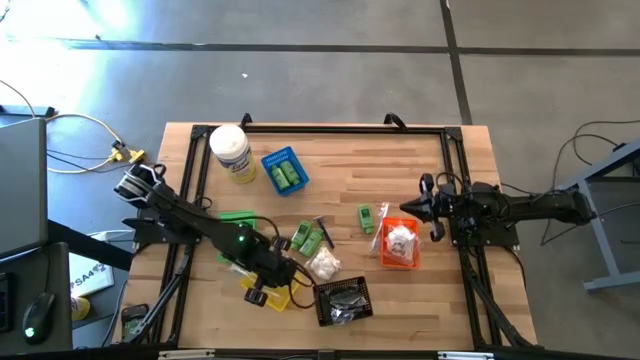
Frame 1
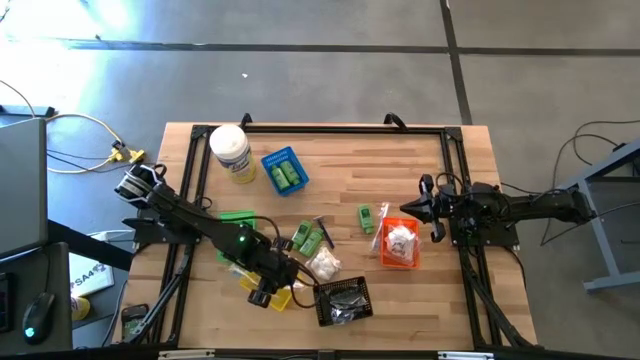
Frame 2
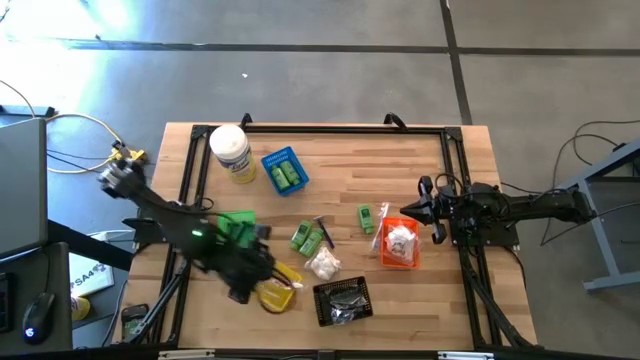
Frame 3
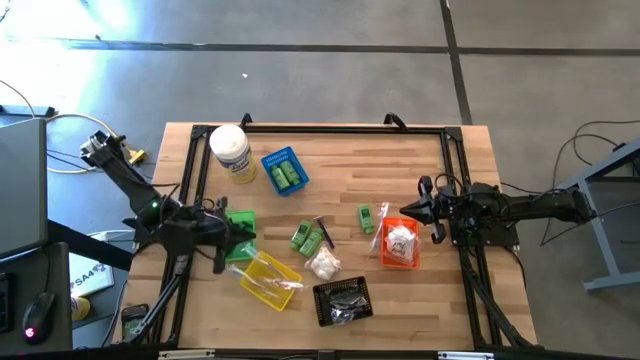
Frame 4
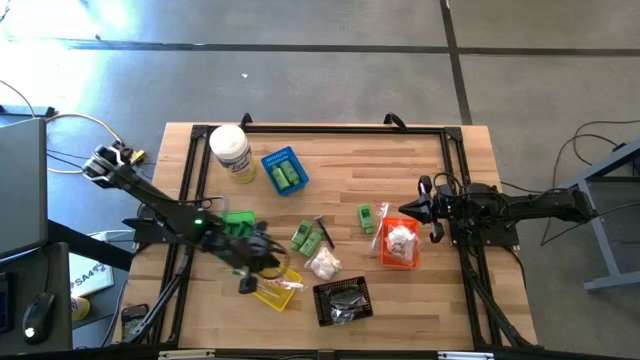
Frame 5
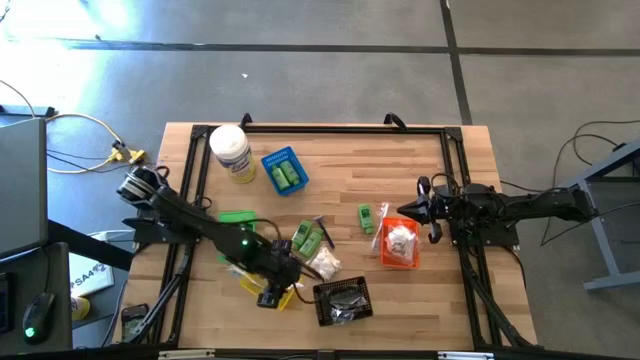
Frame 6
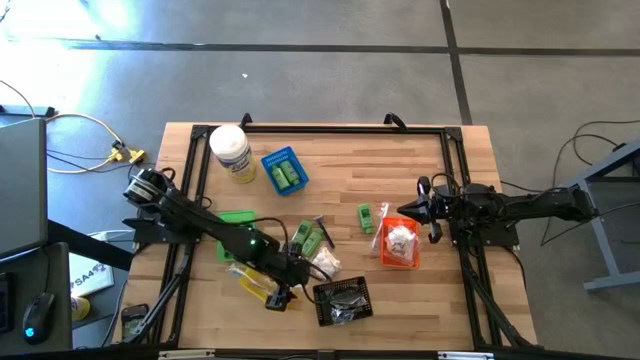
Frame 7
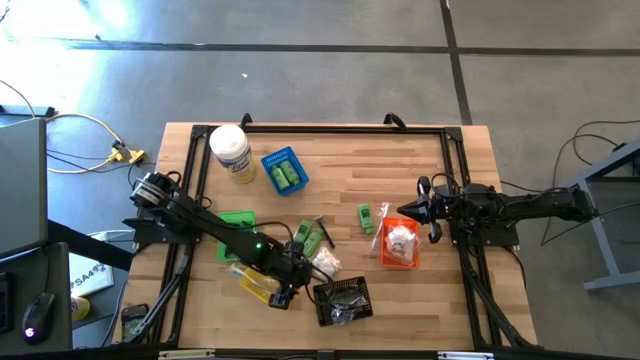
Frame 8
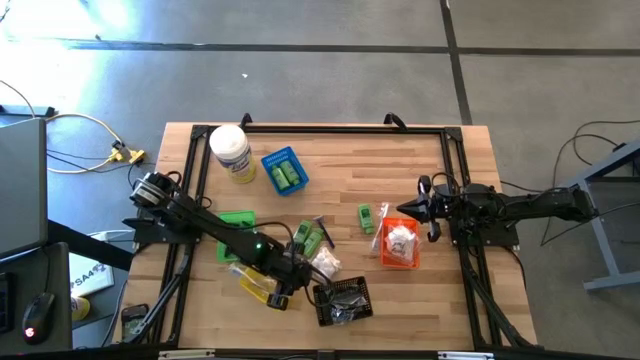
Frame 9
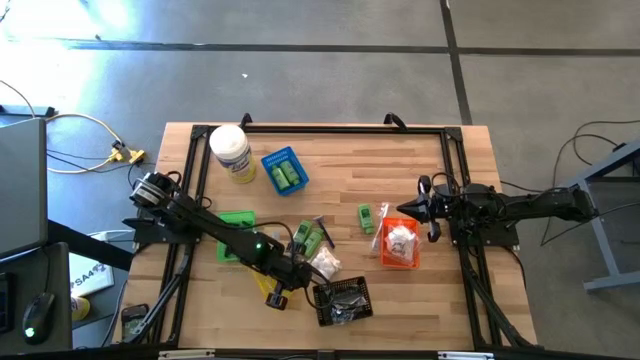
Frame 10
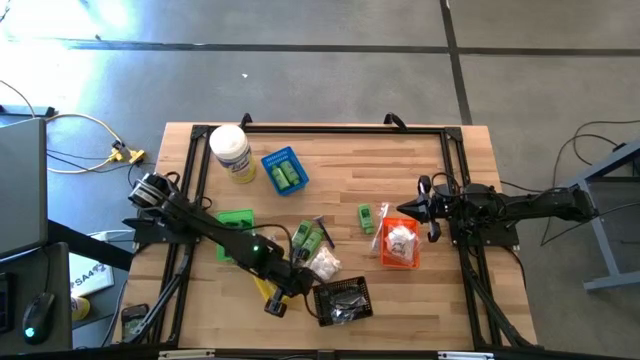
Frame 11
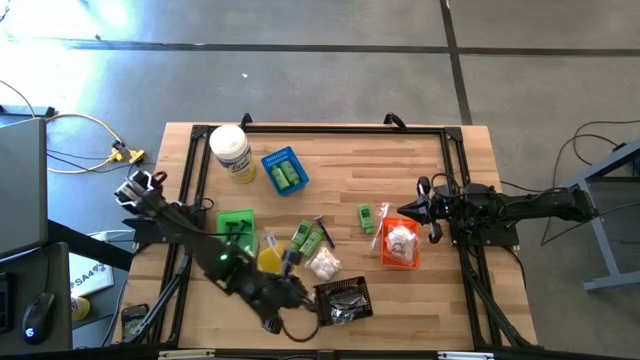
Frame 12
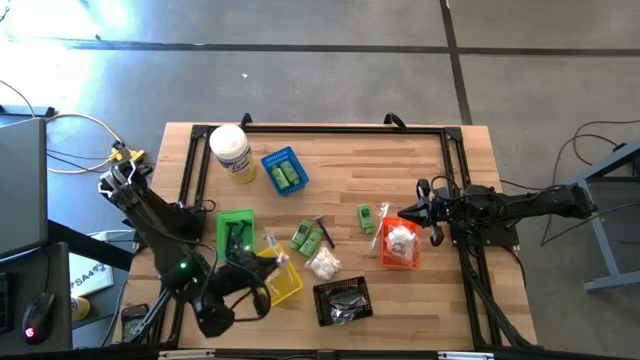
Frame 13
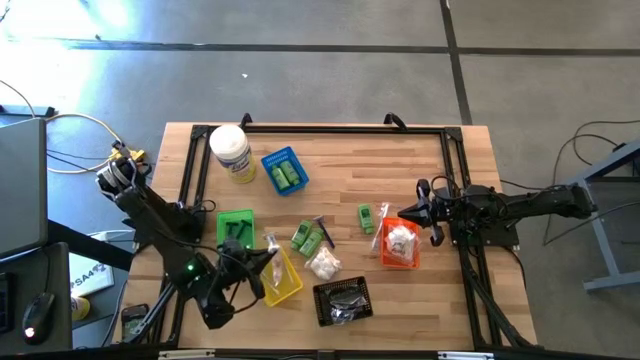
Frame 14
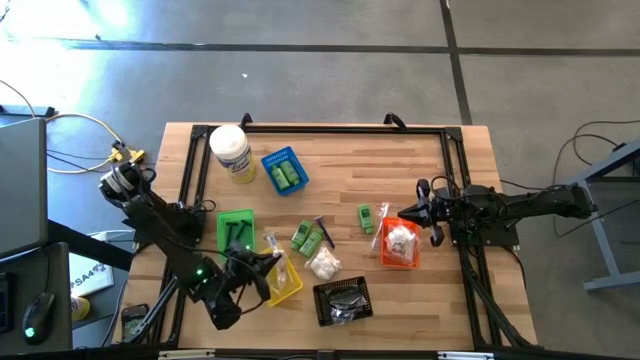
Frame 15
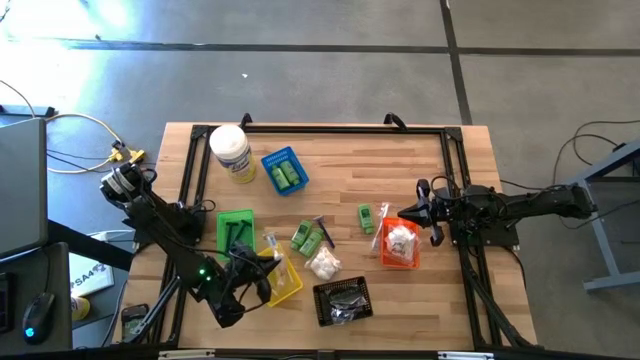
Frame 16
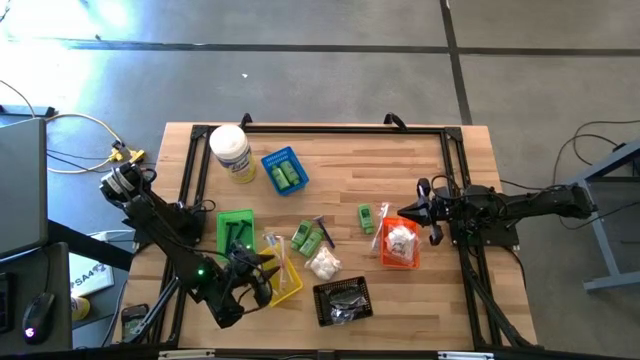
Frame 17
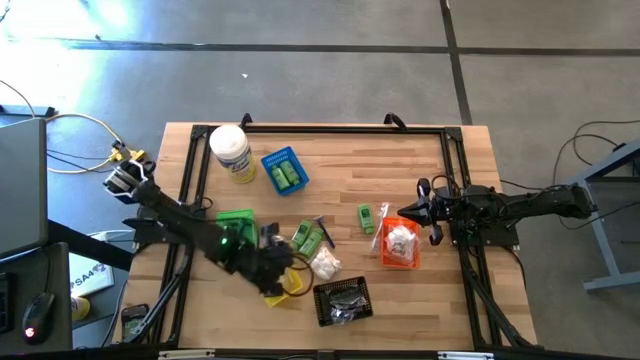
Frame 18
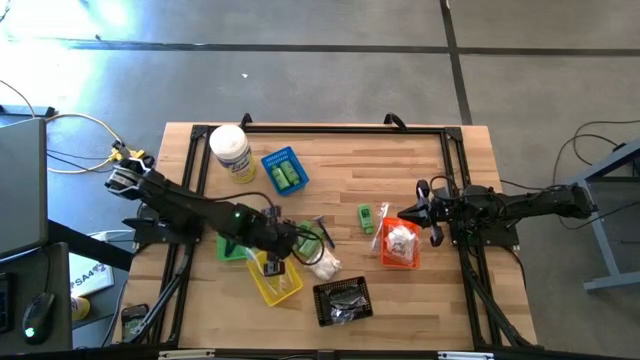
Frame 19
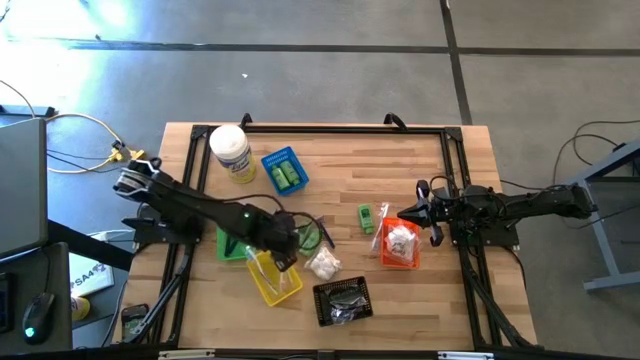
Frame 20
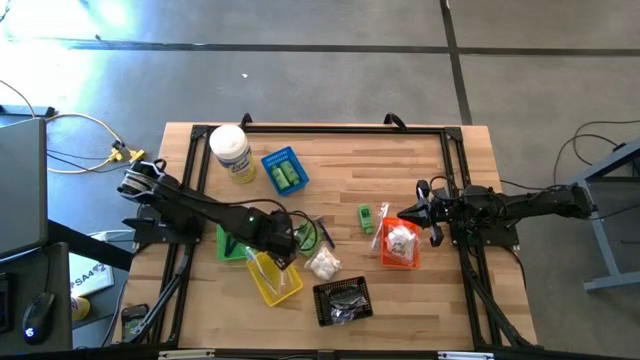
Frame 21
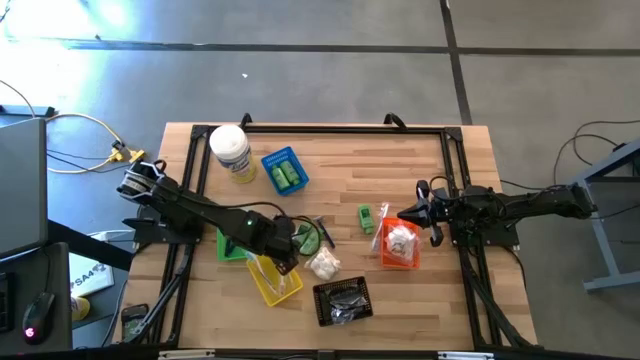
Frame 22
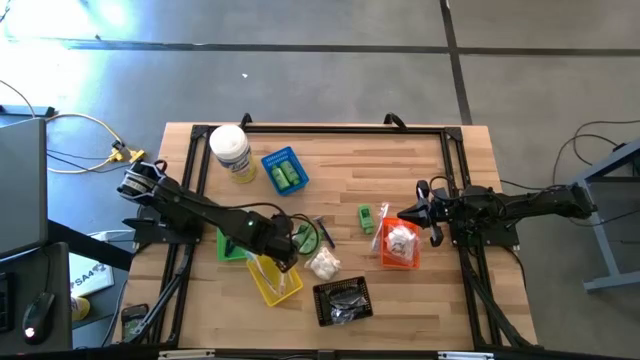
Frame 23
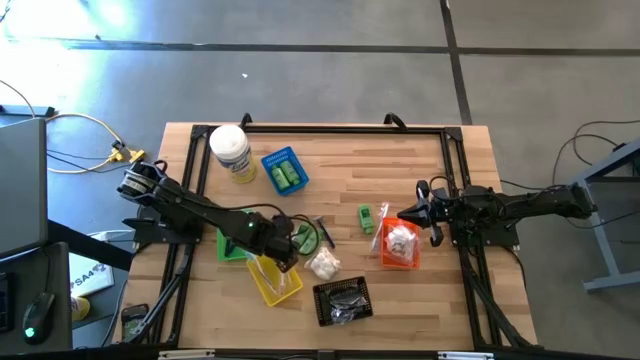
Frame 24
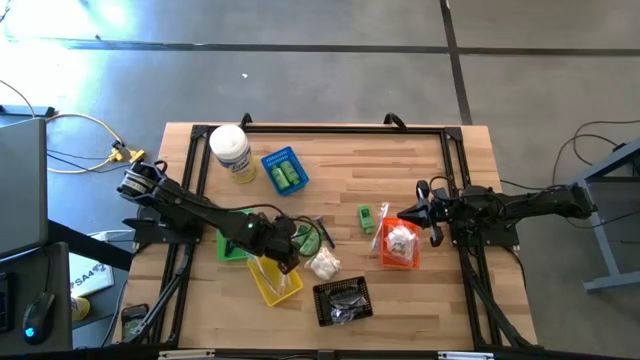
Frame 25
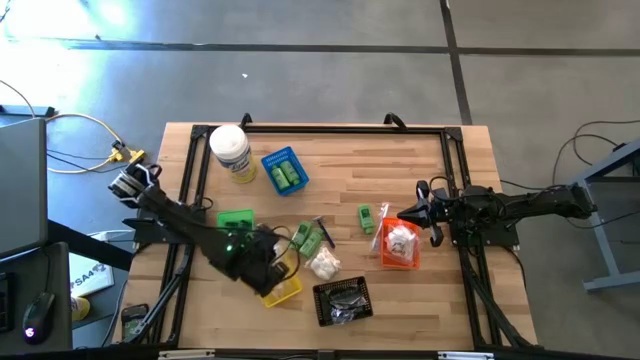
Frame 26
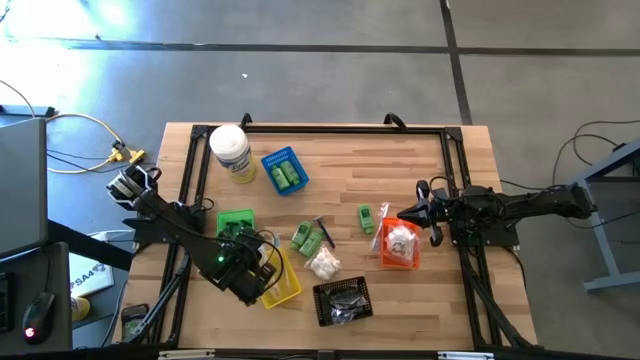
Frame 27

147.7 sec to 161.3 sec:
Task: Pick & Place Travel size toiletries
Put the orange toothbrush into the yellow bin

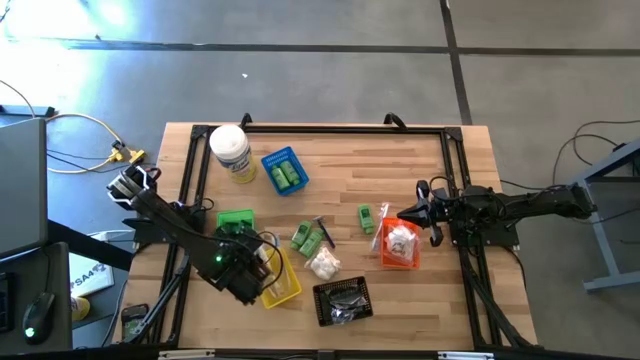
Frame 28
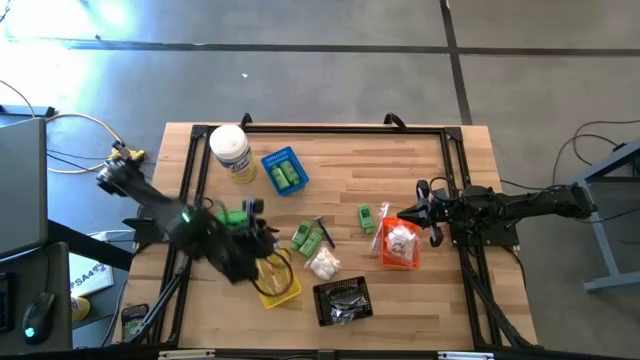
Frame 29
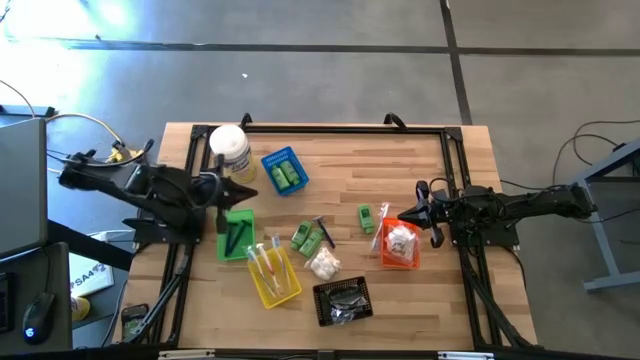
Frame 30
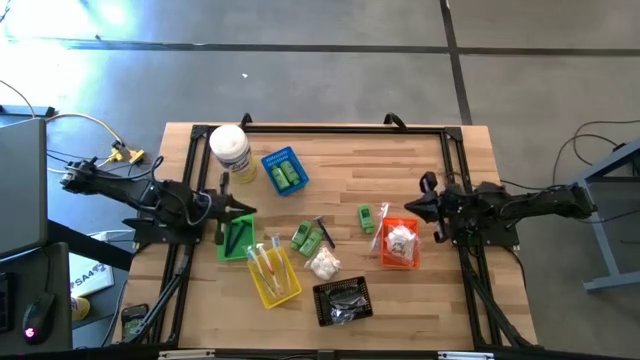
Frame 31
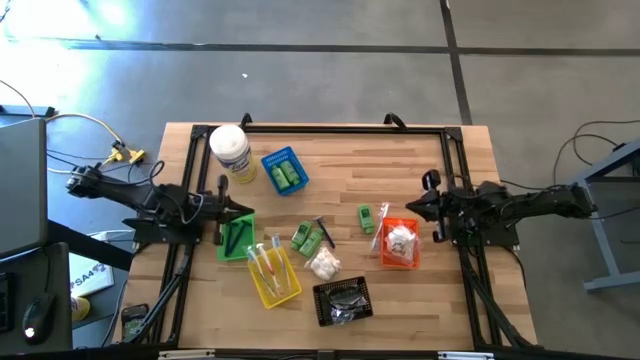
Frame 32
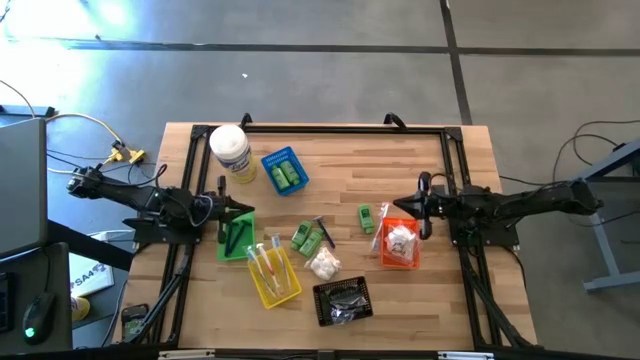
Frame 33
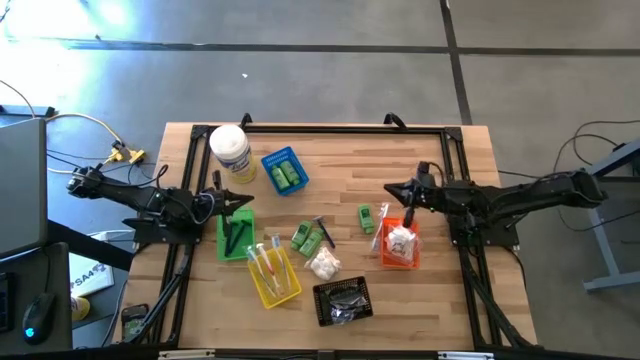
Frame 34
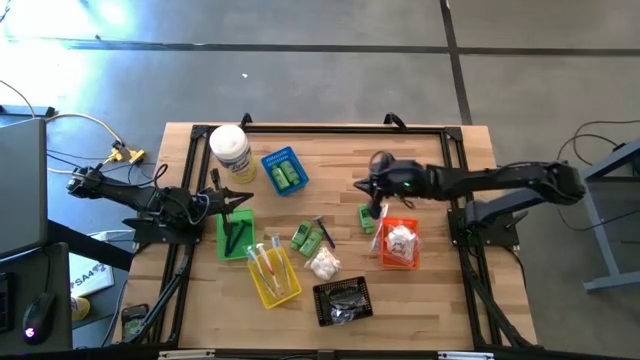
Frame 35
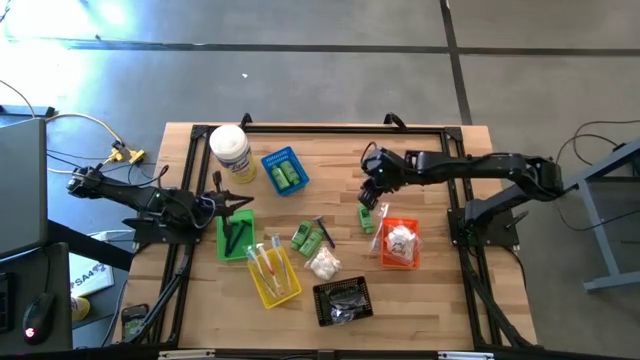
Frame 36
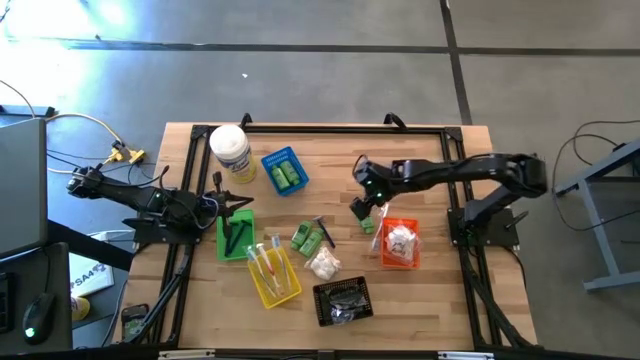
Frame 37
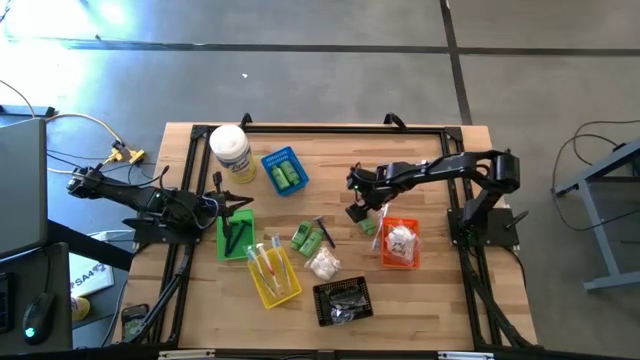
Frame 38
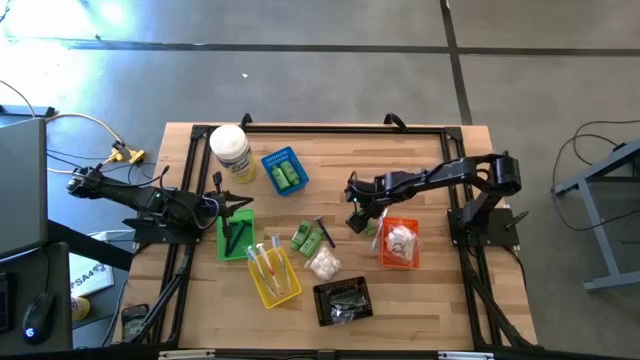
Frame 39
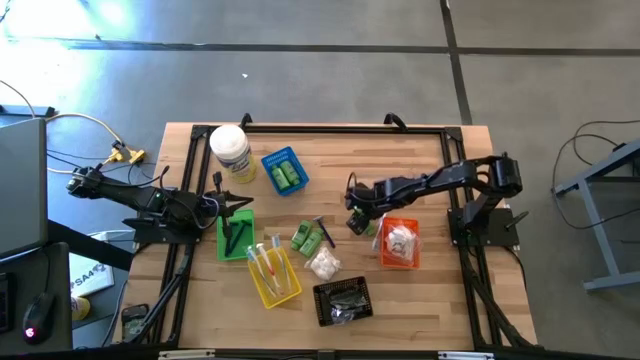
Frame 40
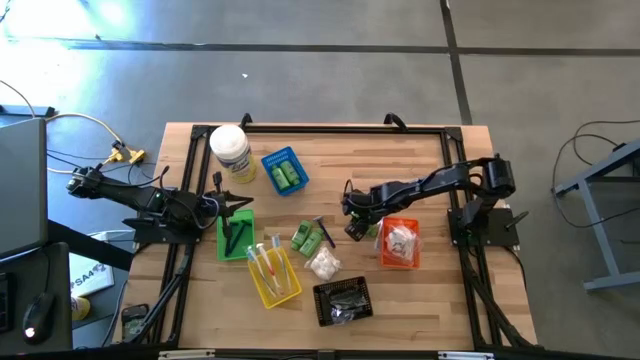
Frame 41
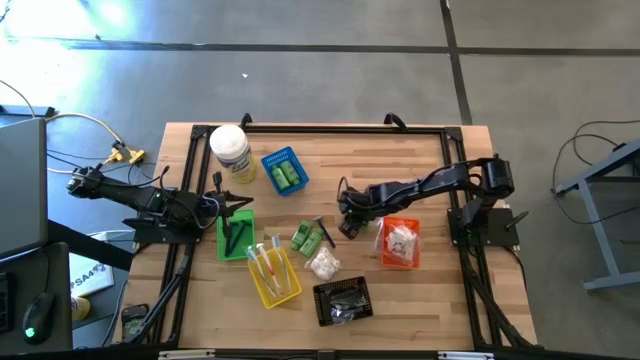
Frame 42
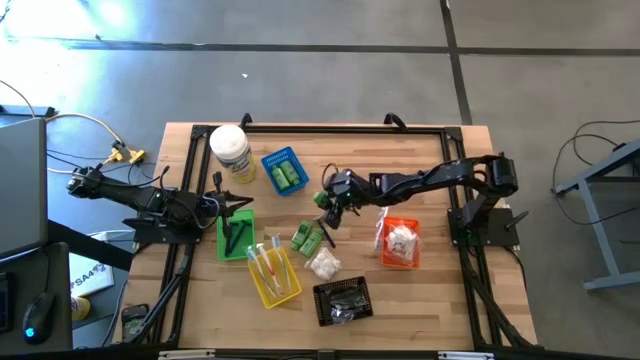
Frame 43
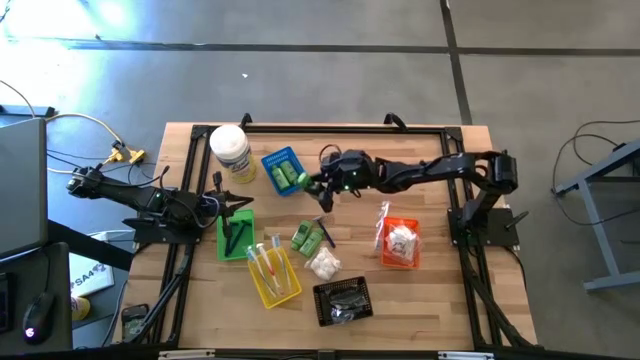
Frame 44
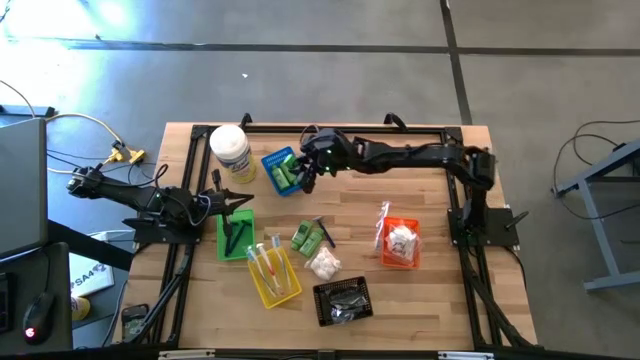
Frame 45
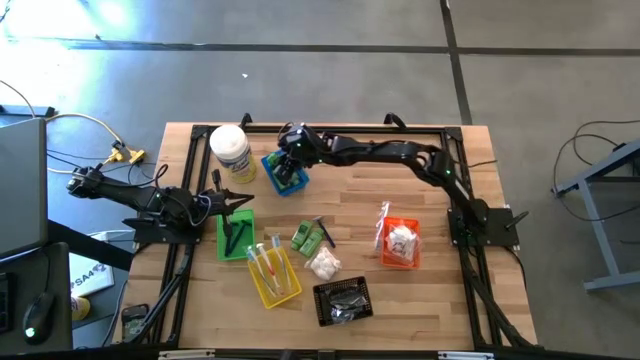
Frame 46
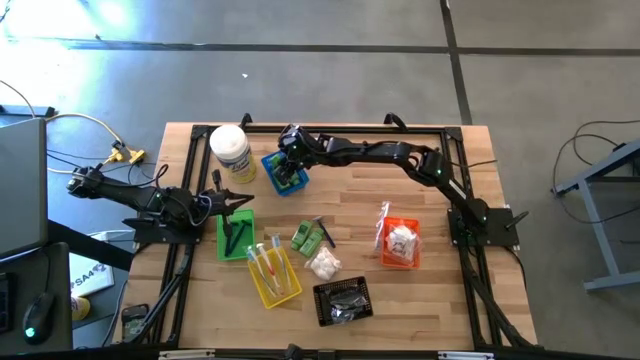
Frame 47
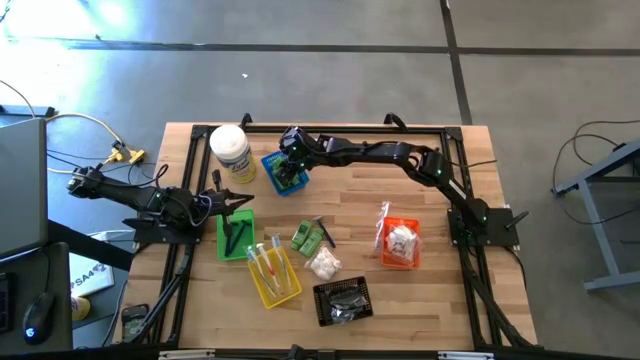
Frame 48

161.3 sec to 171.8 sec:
Put the green shampoo into the blue bin
